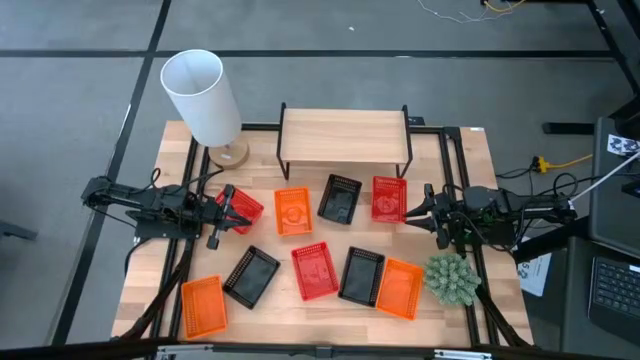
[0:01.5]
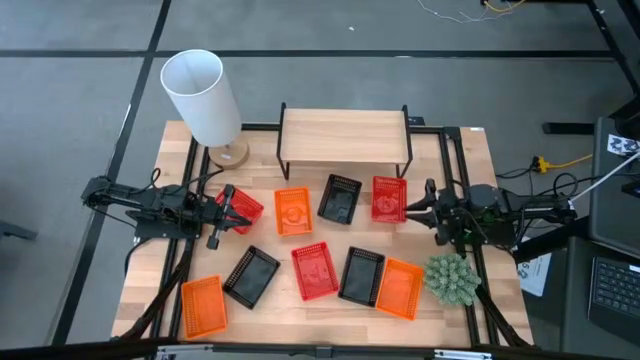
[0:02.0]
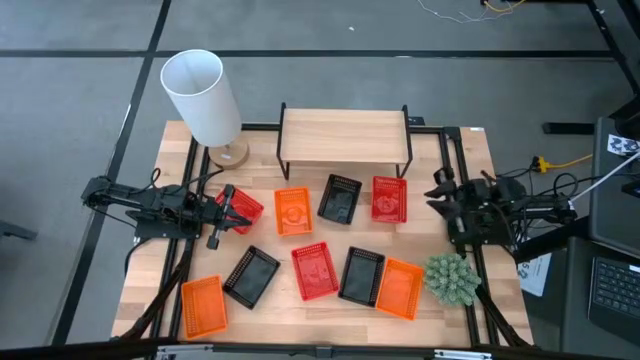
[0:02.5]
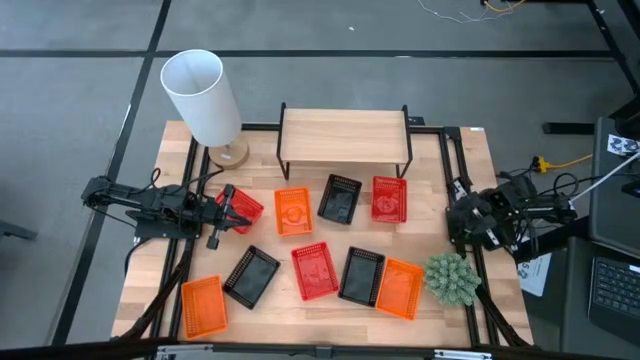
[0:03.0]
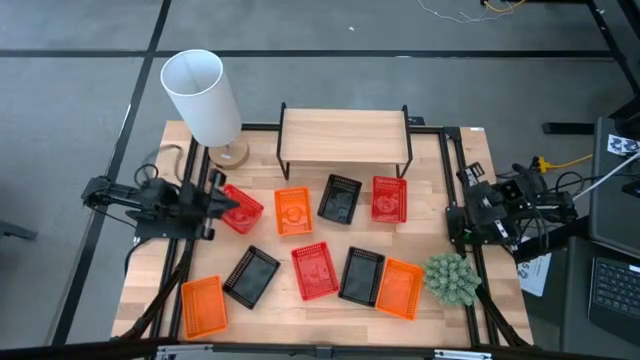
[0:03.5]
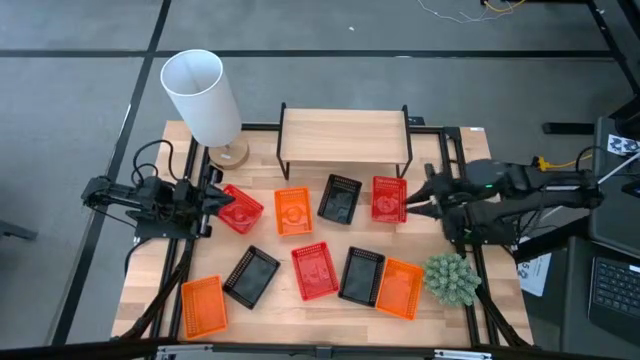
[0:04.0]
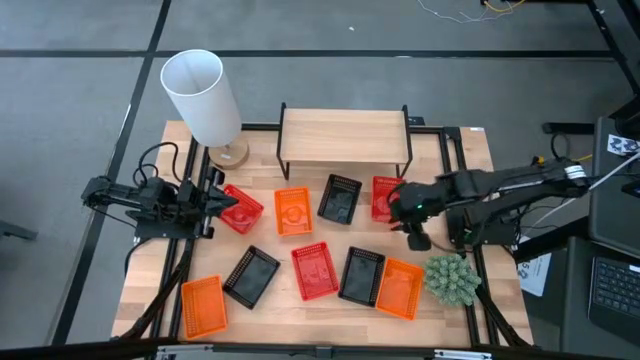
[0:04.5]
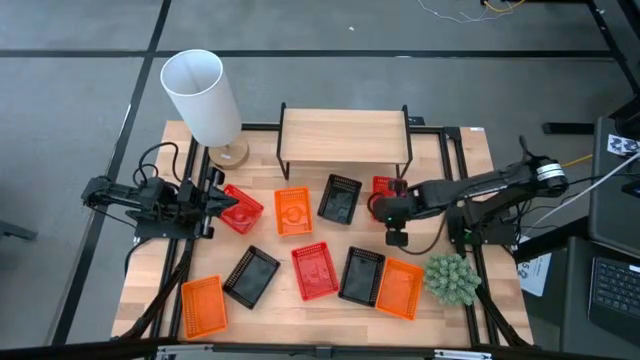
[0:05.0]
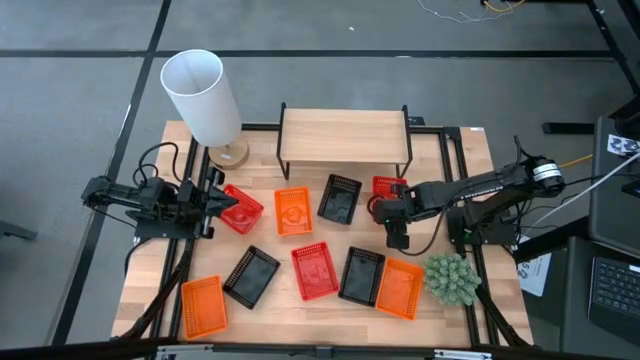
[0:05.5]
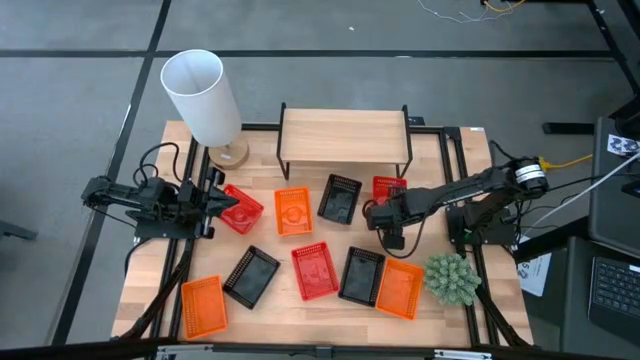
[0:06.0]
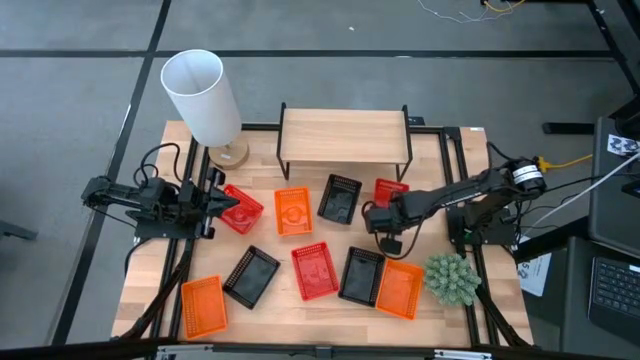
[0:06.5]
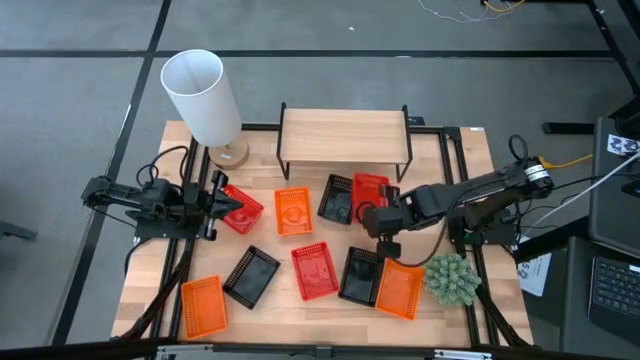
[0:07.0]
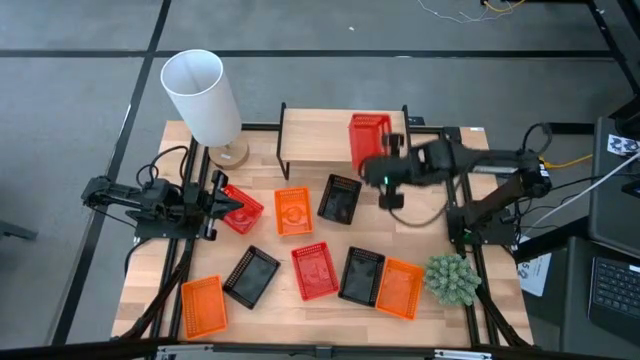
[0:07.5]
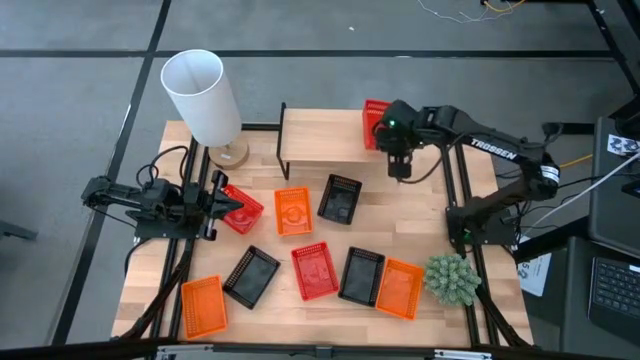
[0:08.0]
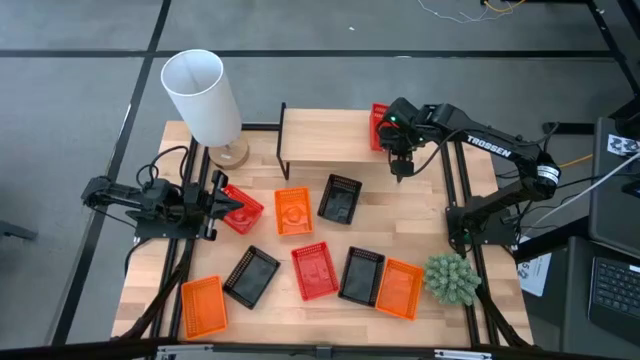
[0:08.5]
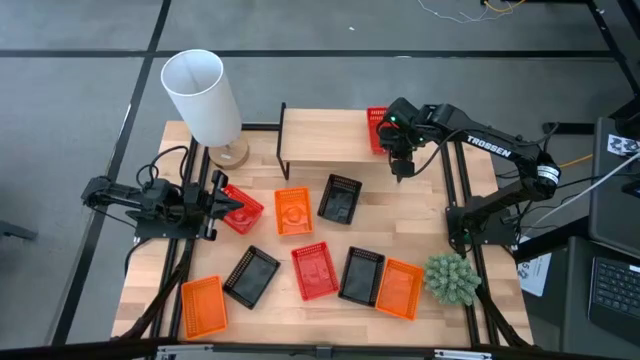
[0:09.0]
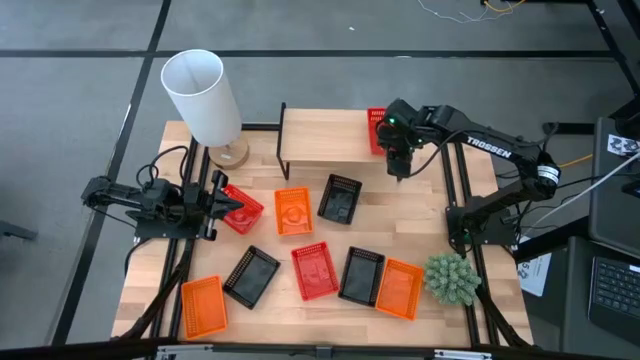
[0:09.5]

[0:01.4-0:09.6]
Task: Stack baskets on shelf by color
Put the right red basket on the shelf

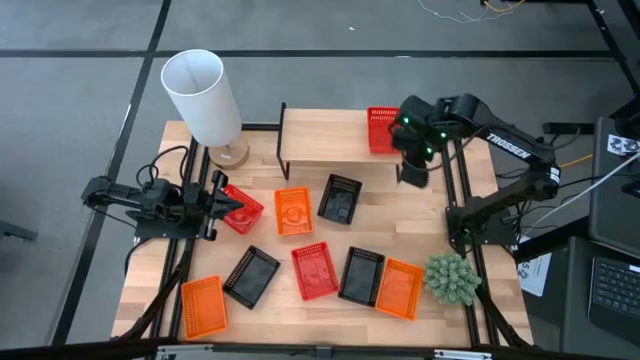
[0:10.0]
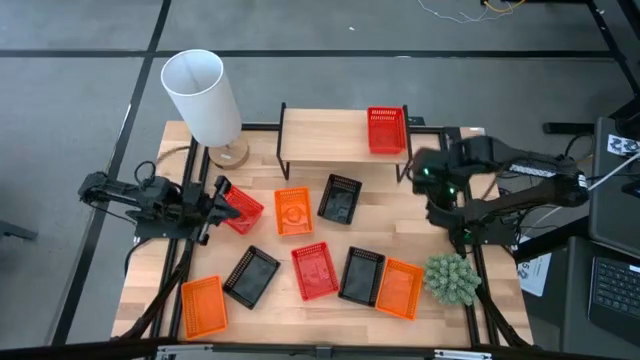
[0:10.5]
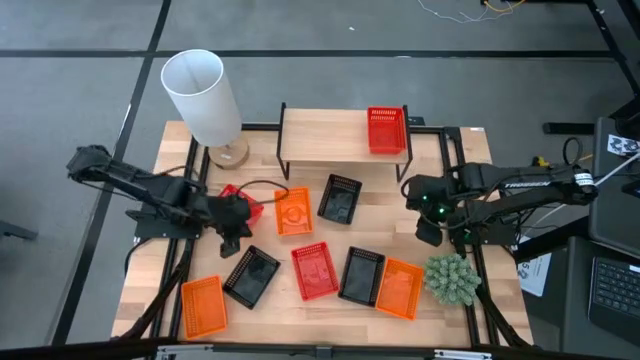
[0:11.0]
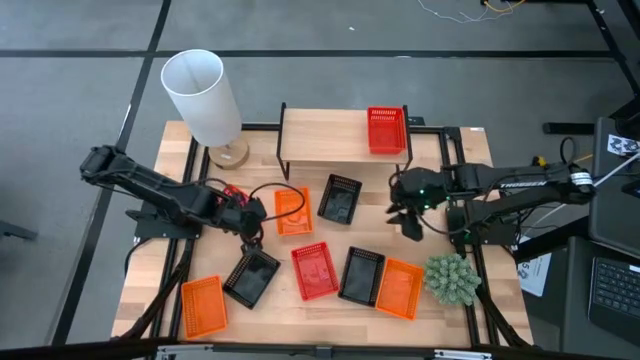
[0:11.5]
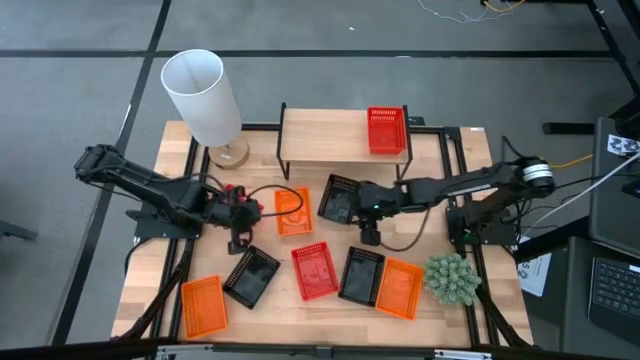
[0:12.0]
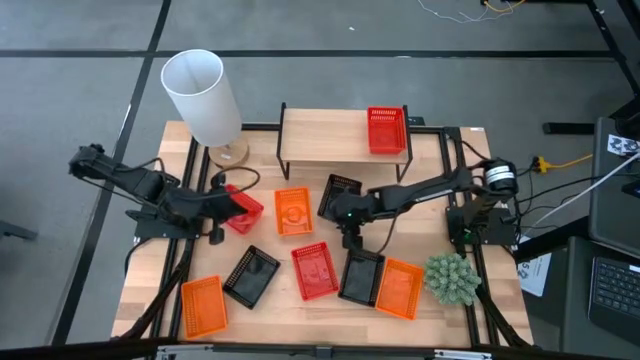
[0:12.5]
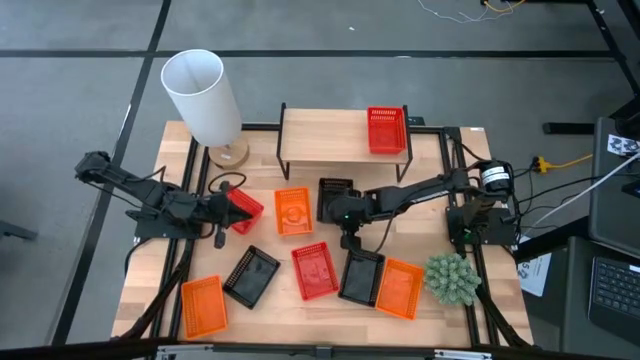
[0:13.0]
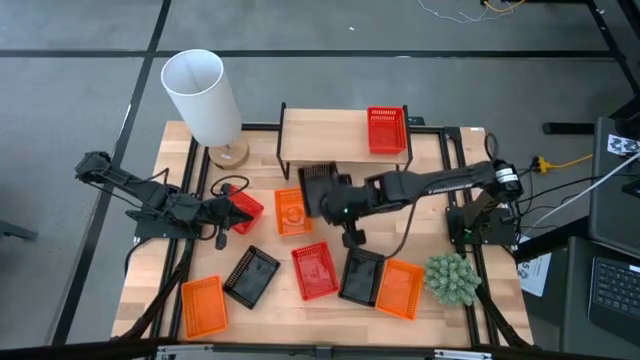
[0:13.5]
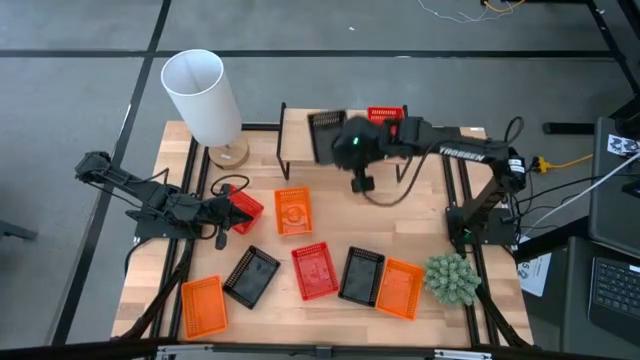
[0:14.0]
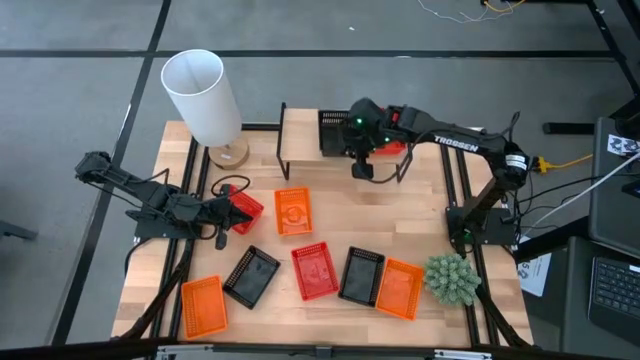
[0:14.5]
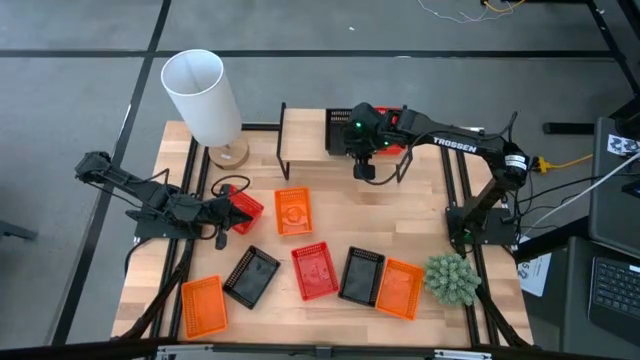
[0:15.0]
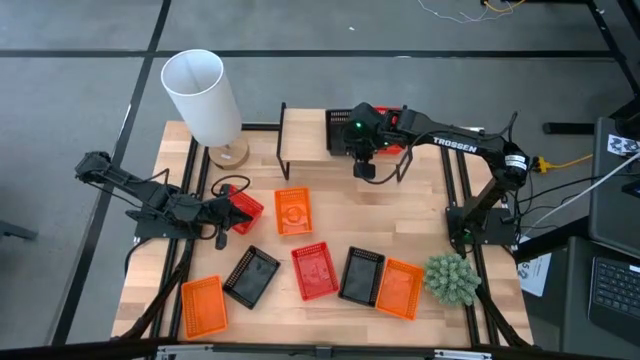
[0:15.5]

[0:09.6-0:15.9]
Put the top black basket on the shelf

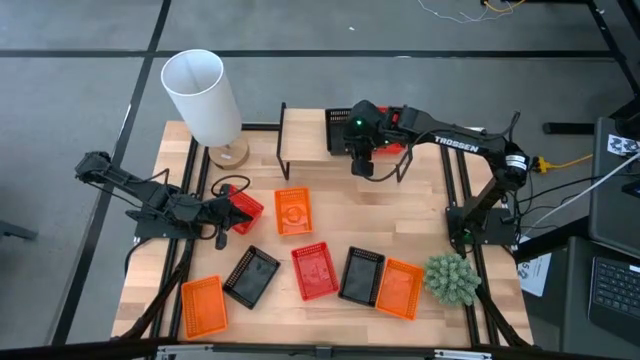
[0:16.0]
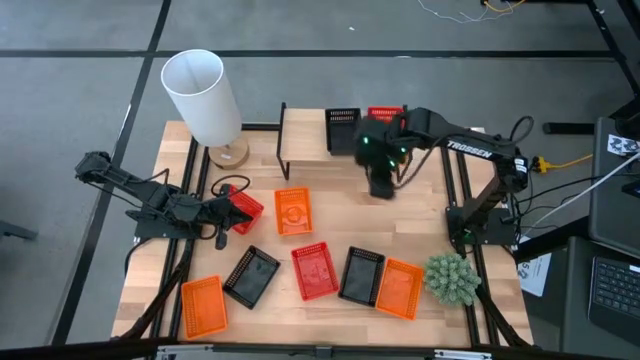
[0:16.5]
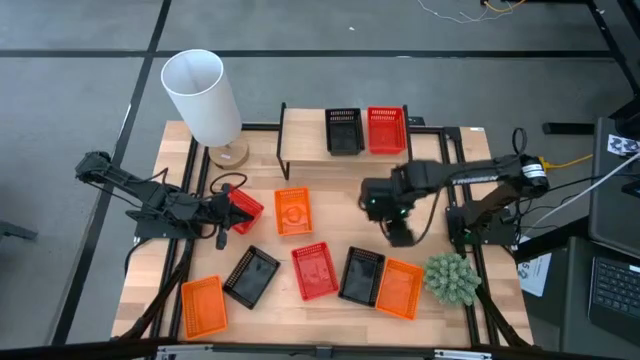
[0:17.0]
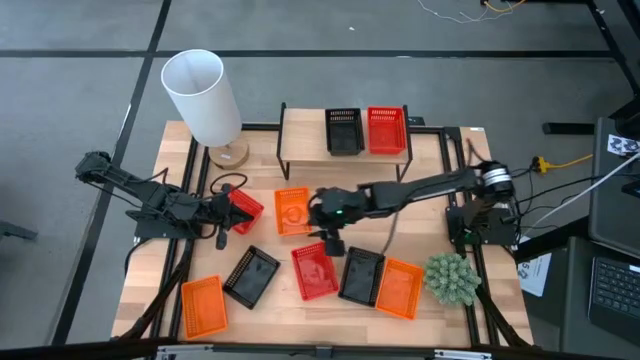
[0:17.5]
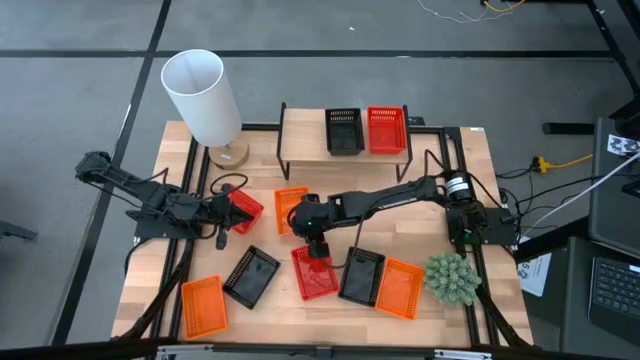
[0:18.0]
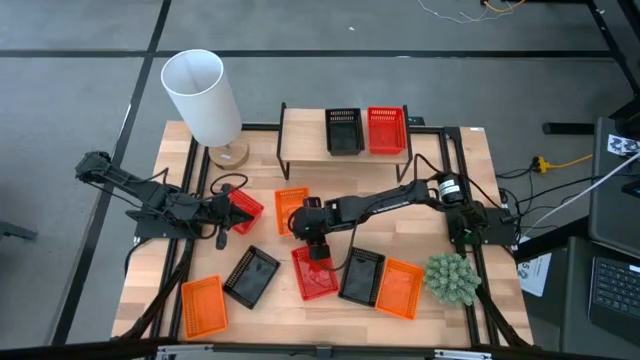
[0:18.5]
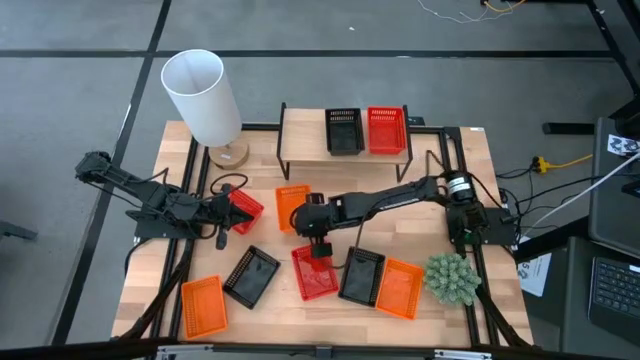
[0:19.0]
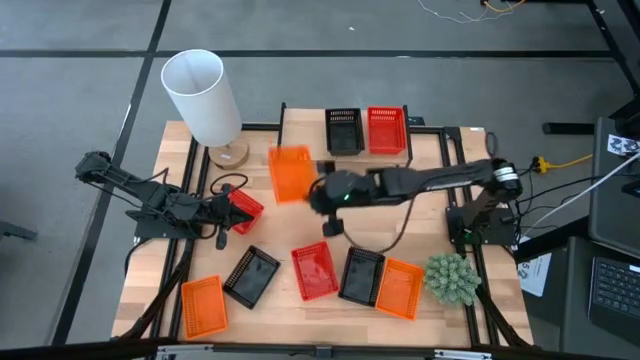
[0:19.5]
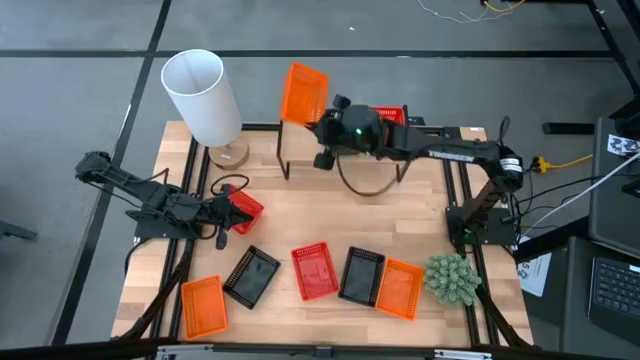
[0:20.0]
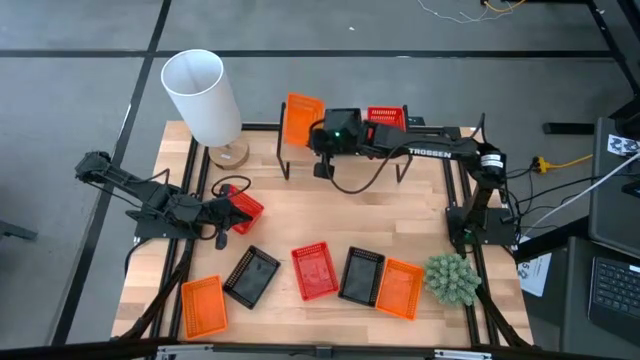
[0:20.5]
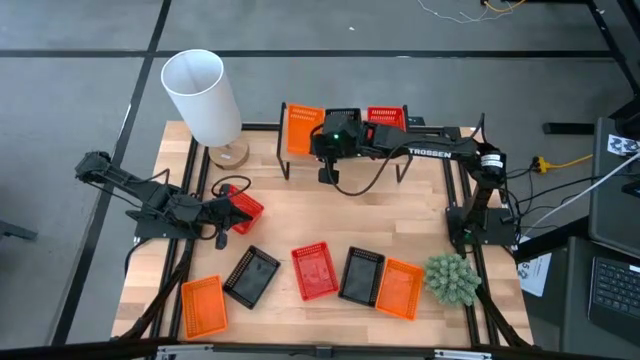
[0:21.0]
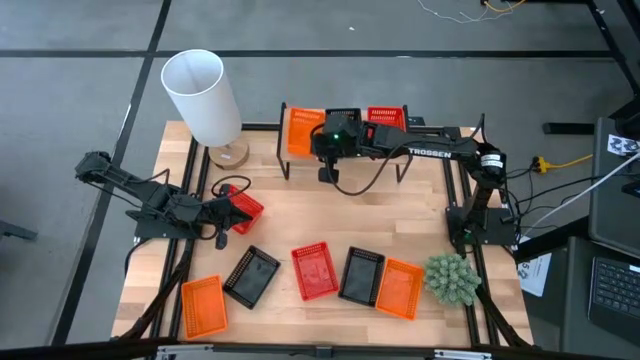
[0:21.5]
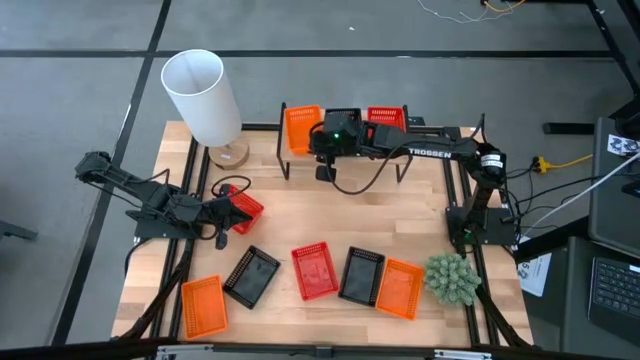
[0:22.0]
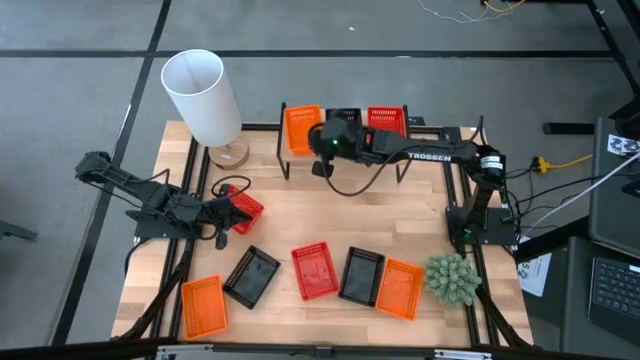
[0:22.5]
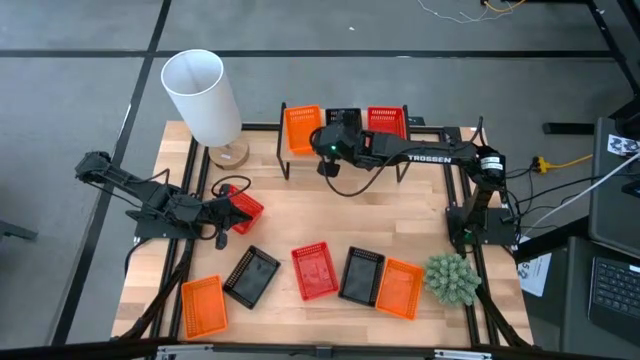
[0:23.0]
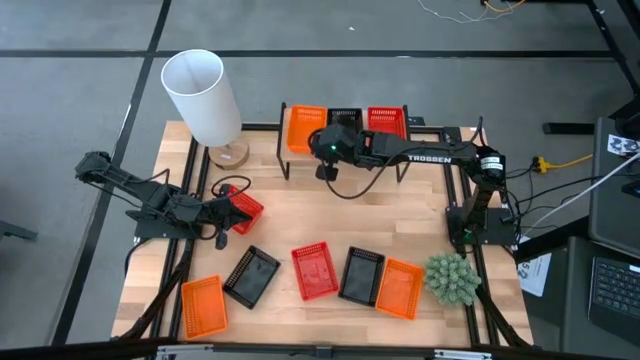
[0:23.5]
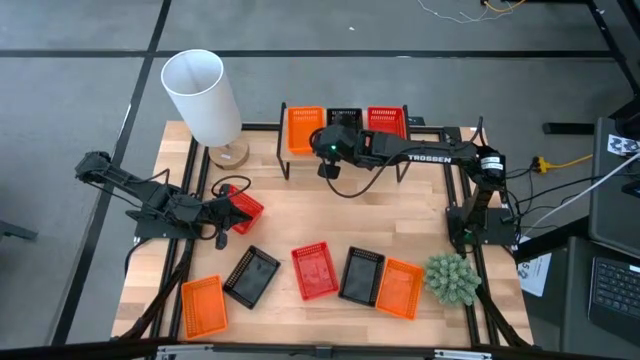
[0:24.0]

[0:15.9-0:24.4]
Put the top orange basket on the shelf
